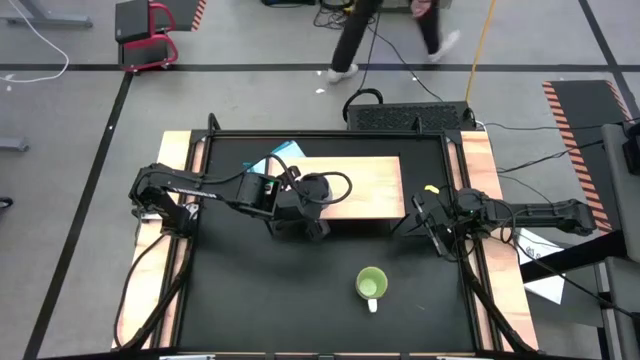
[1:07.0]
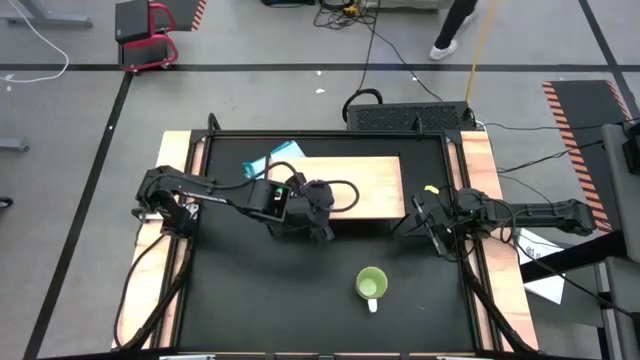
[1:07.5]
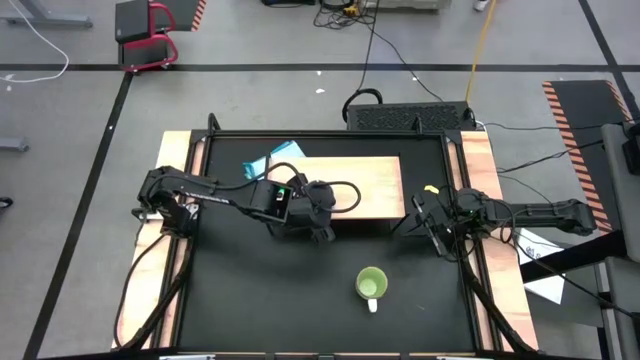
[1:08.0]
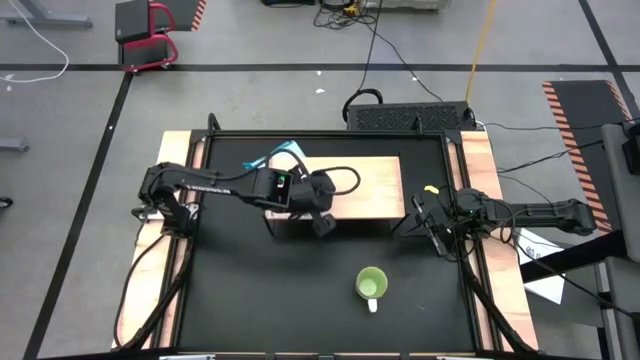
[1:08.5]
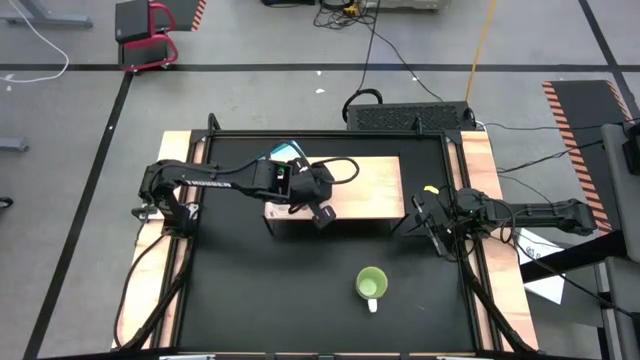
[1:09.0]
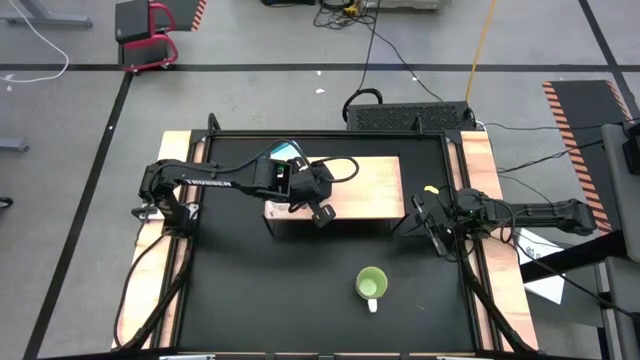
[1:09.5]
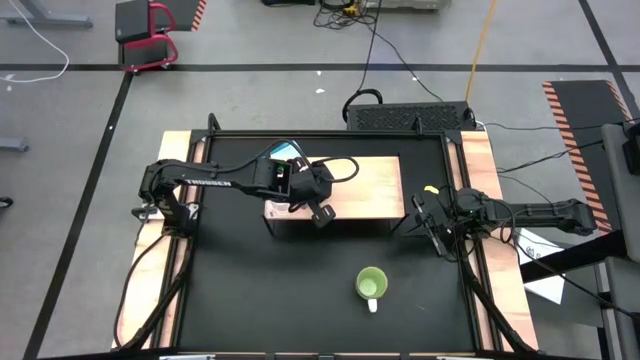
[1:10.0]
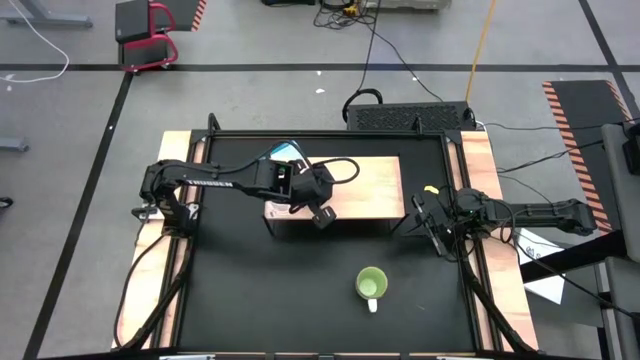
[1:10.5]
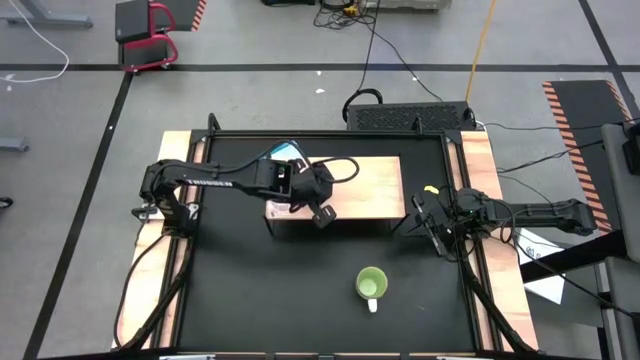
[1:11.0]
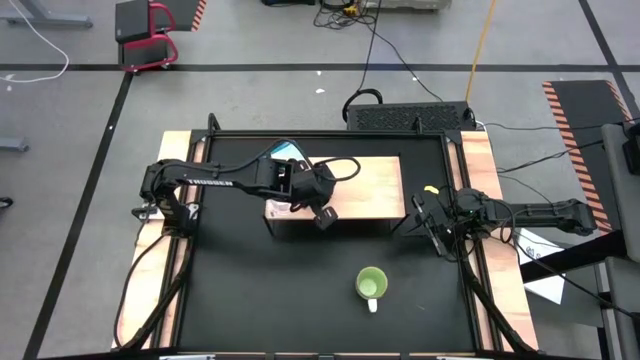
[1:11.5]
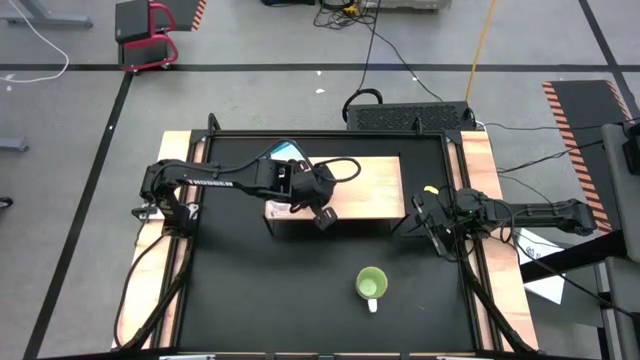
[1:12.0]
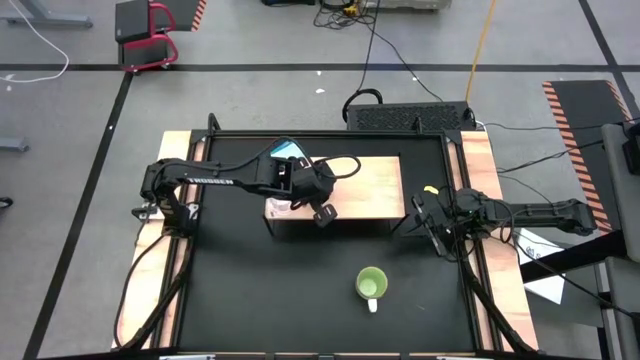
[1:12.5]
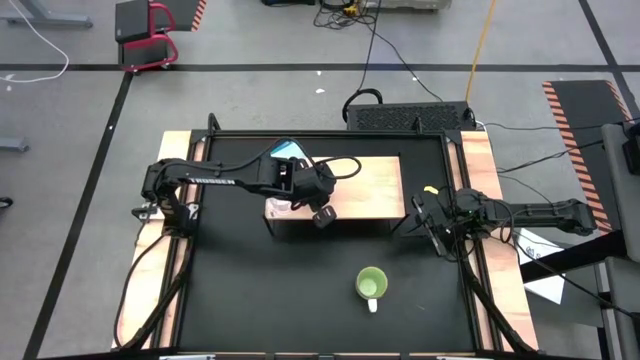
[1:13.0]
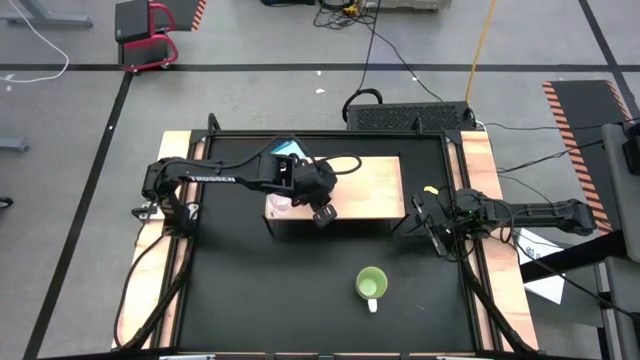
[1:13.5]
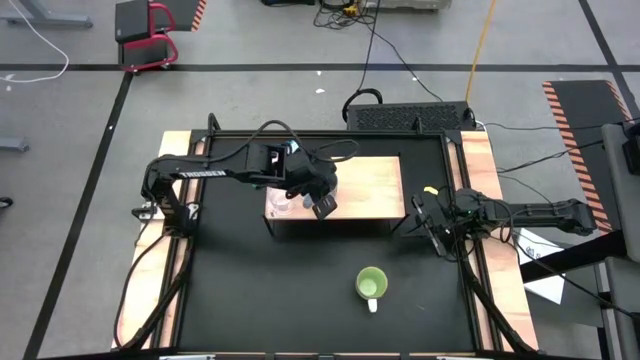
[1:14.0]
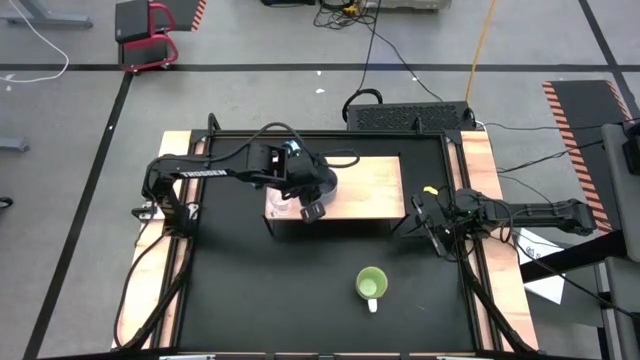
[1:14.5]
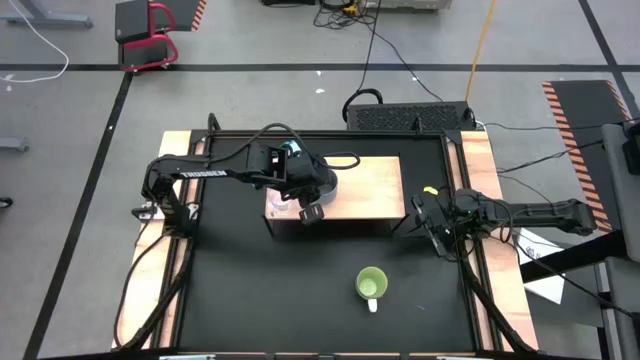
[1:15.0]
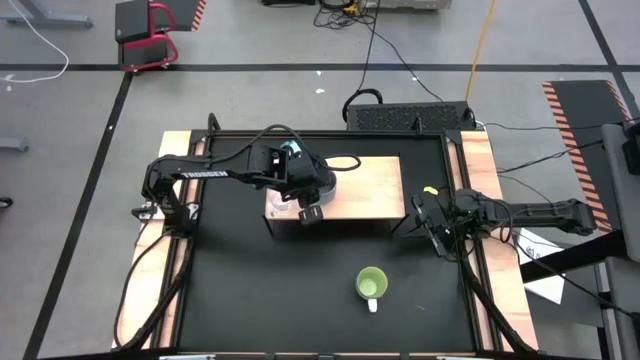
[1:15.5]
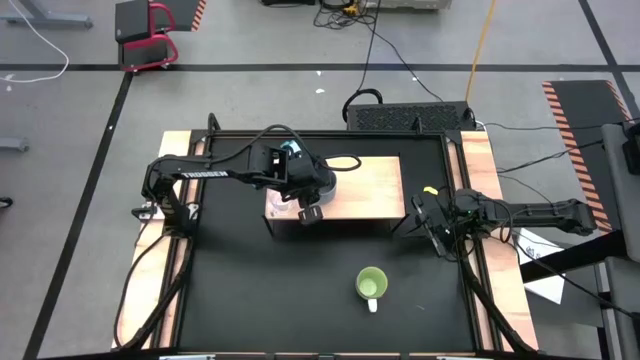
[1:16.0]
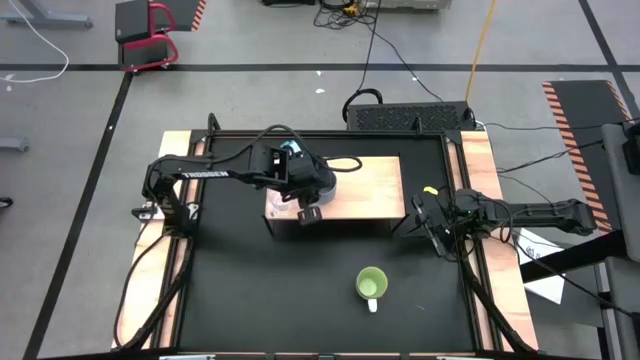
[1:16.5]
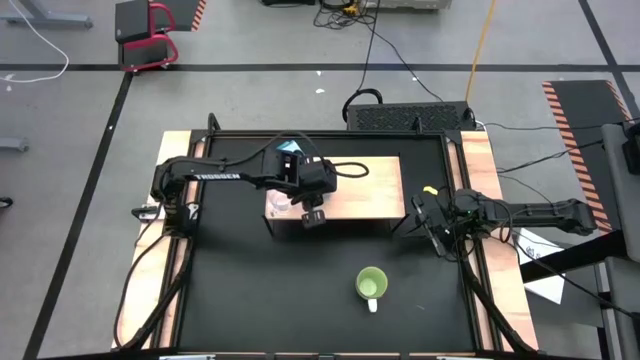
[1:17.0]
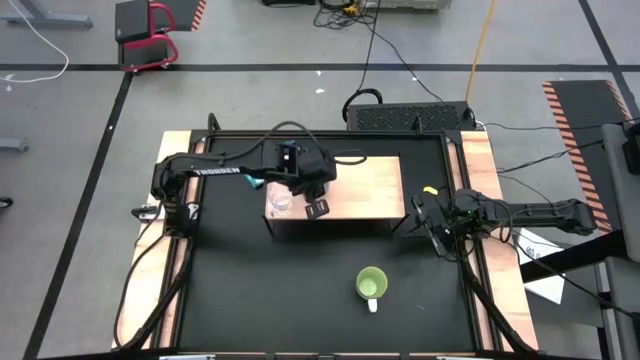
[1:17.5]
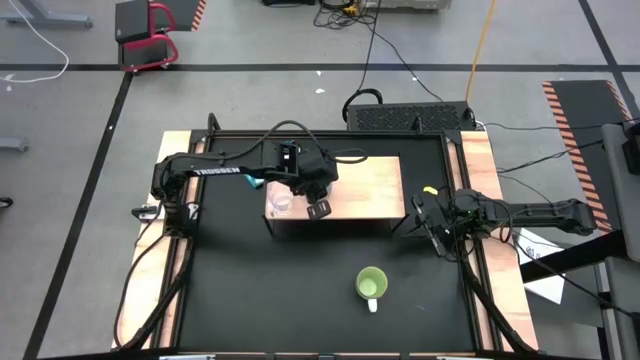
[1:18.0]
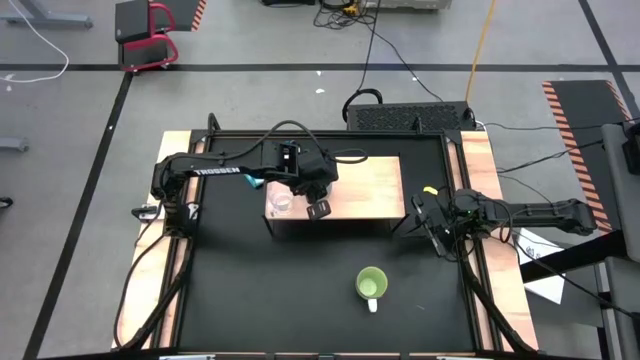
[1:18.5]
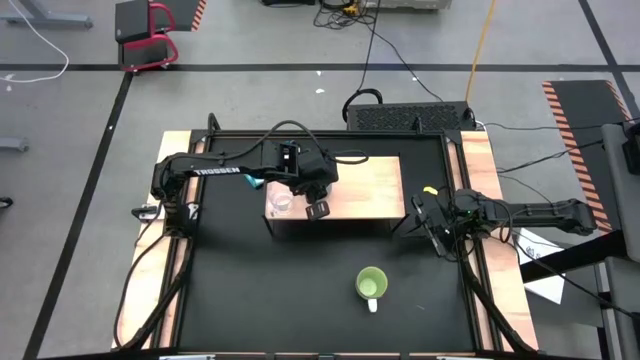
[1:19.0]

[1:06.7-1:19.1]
Task: Stack small to large cups/mugs on shelf
Put the gray mug on the shelf

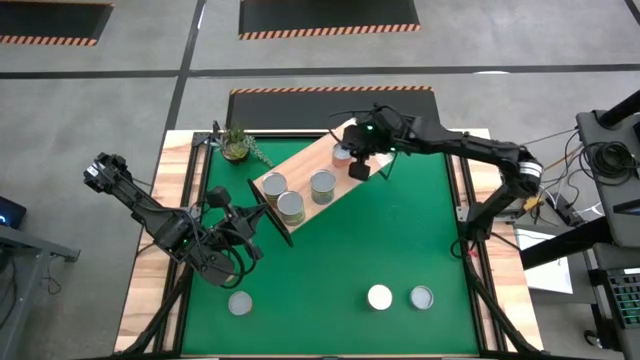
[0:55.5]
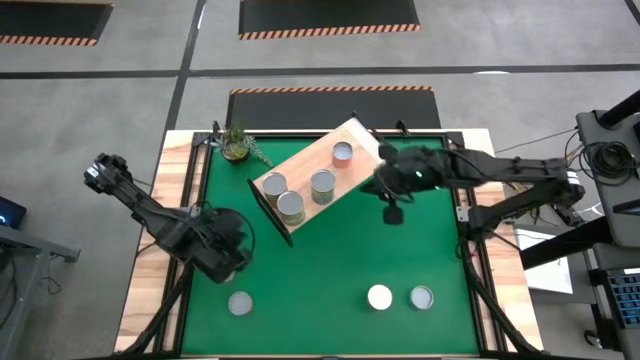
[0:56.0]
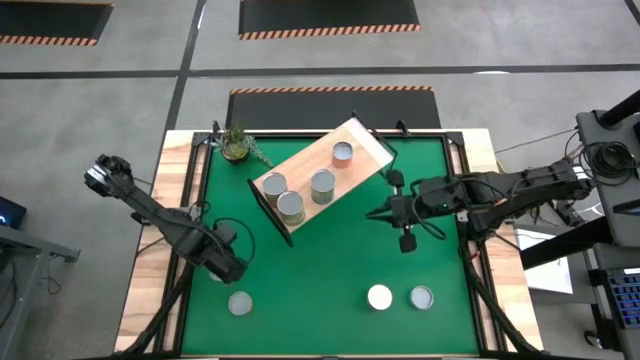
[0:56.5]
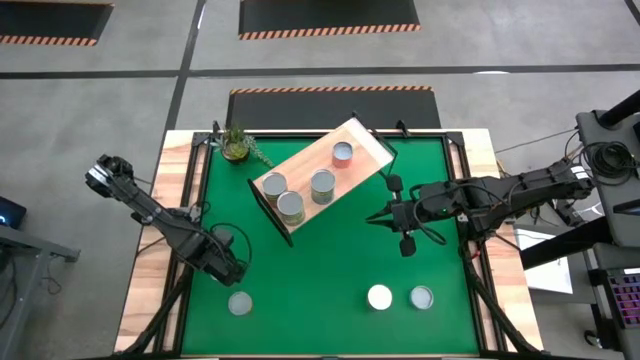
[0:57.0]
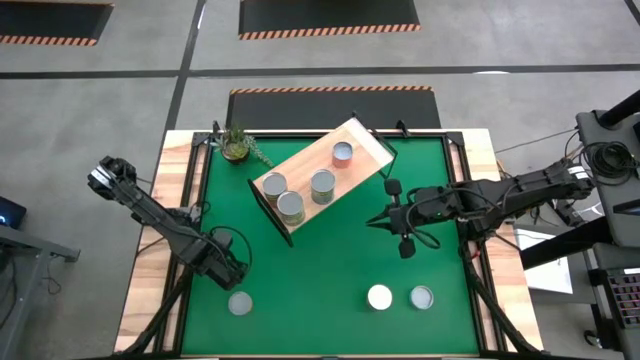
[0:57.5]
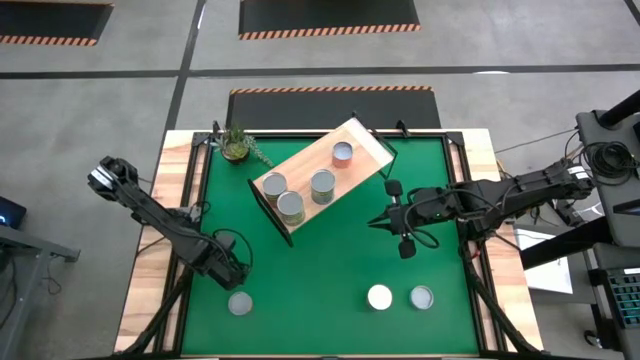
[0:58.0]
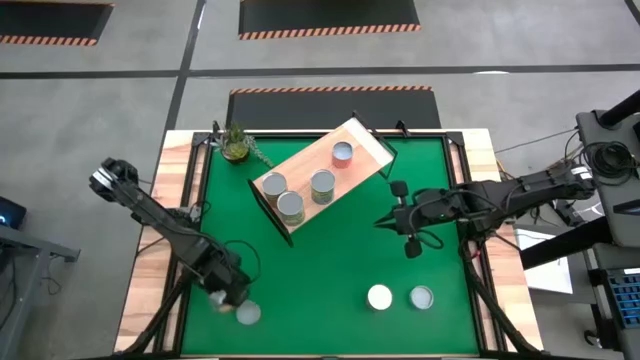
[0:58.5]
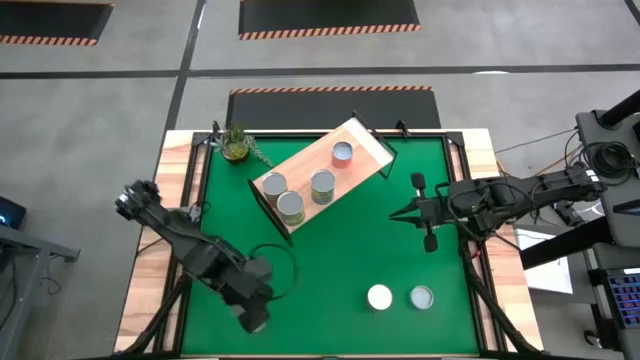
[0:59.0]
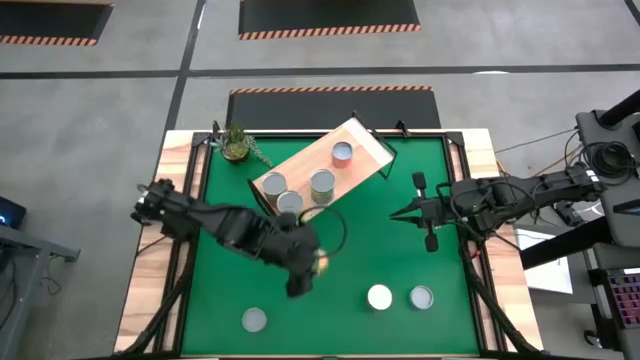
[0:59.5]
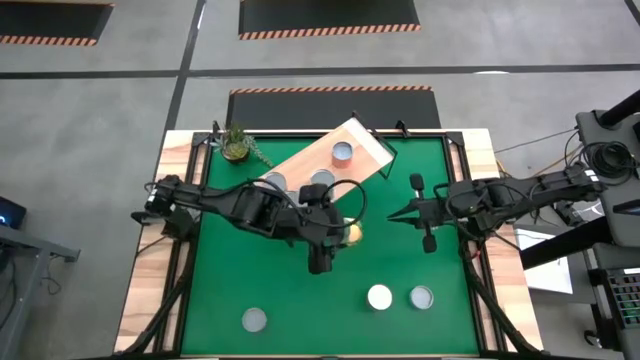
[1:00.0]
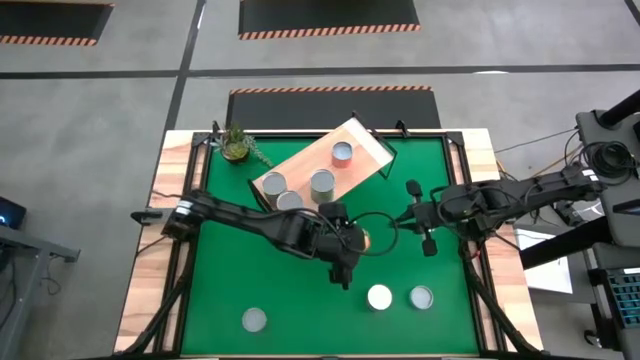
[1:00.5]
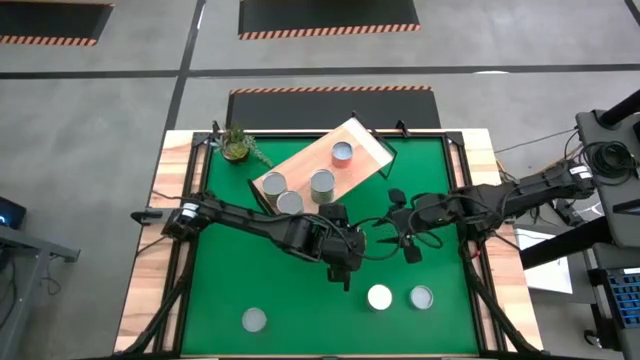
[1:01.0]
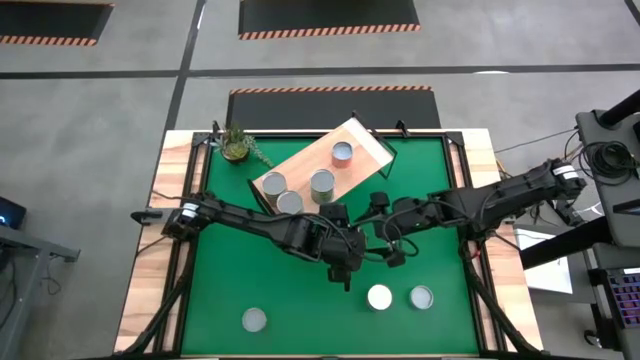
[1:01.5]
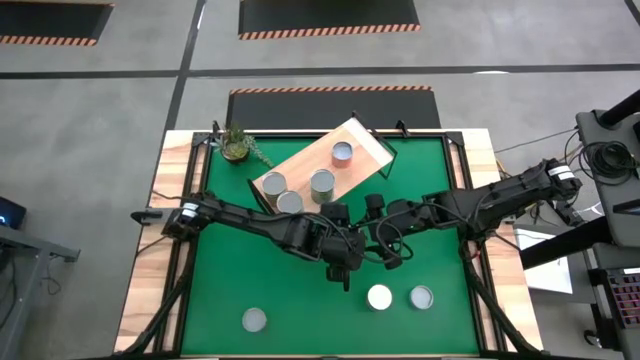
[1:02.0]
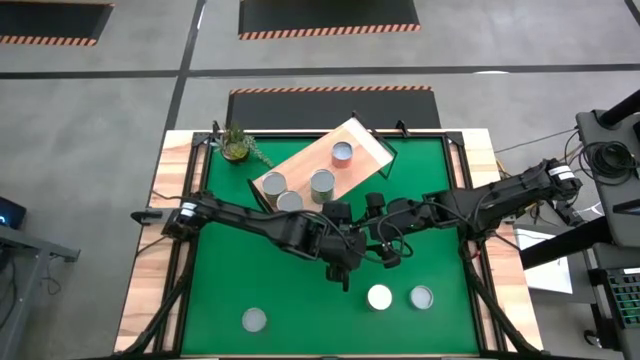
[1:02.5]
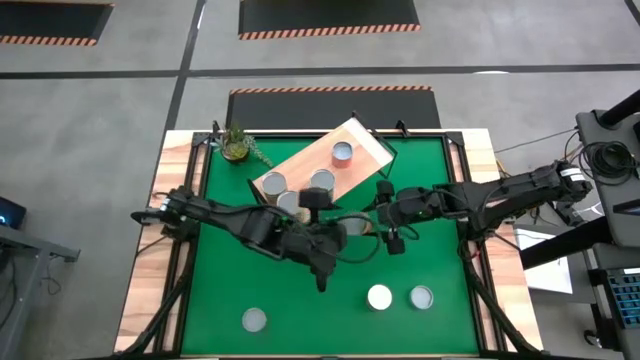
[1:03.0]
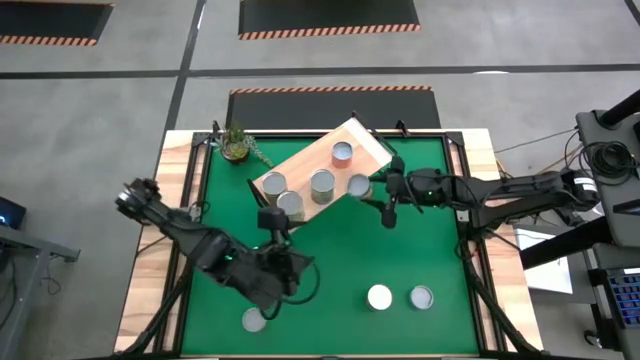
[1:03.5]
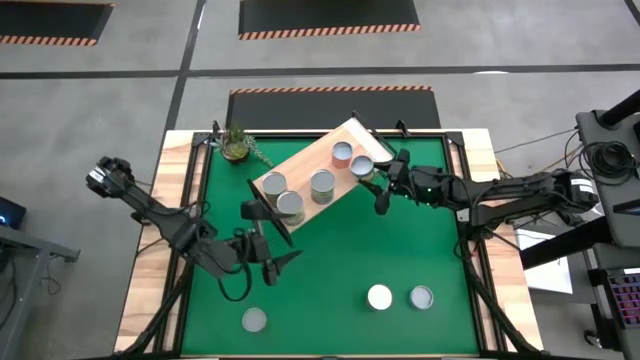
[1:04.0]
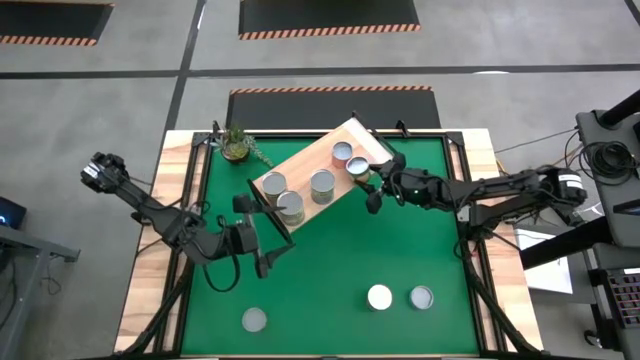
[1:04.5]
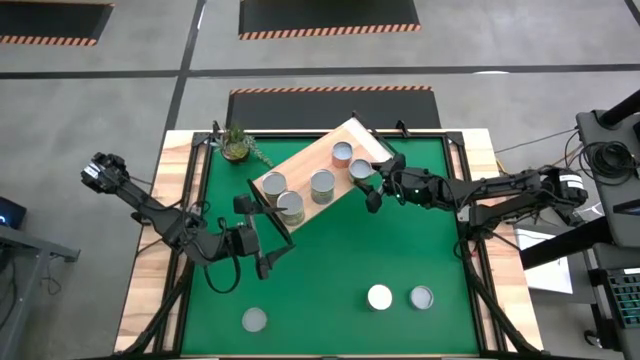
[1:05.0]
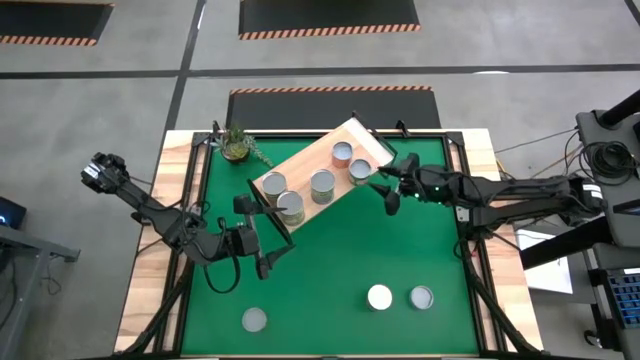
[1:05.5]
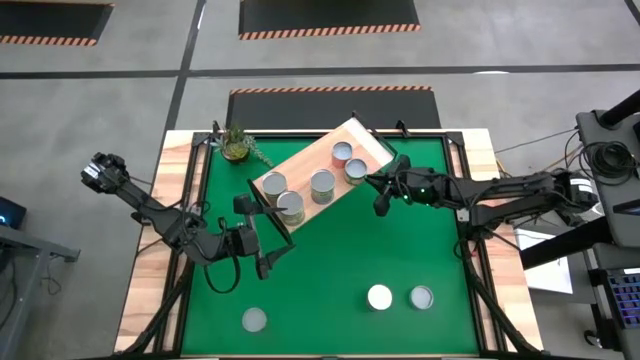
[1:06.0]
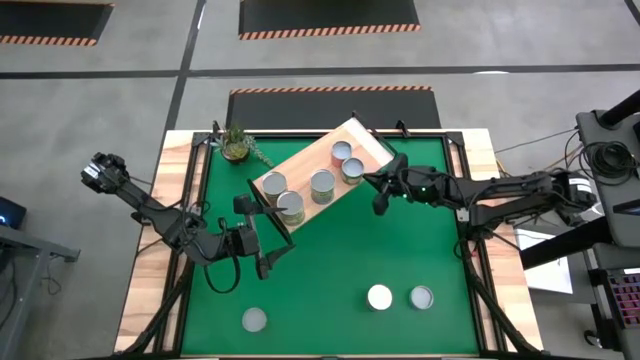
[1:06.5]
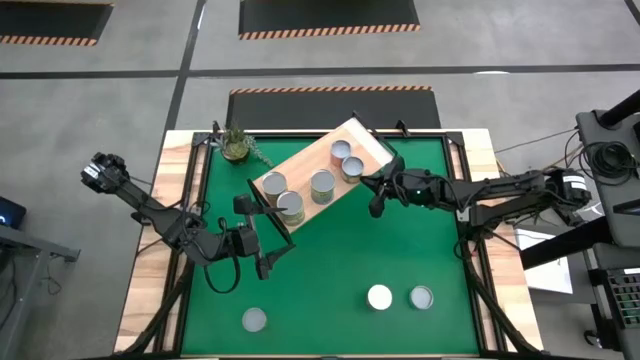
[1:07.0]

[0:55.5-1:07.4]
Task: Pick and place cans onto a shelf
Put the dark green can on the shelf
